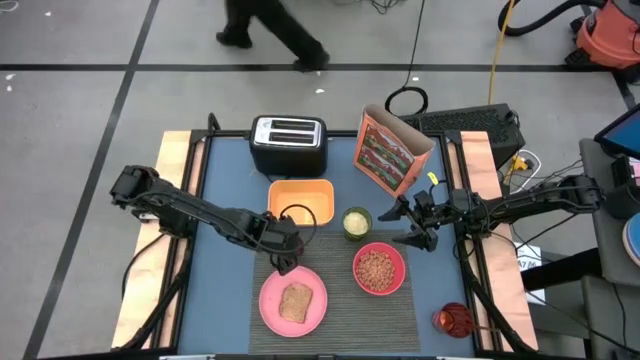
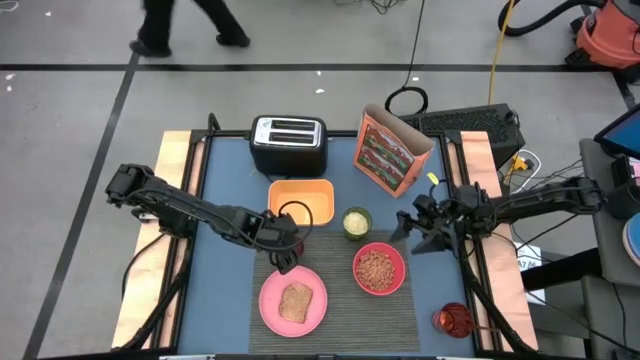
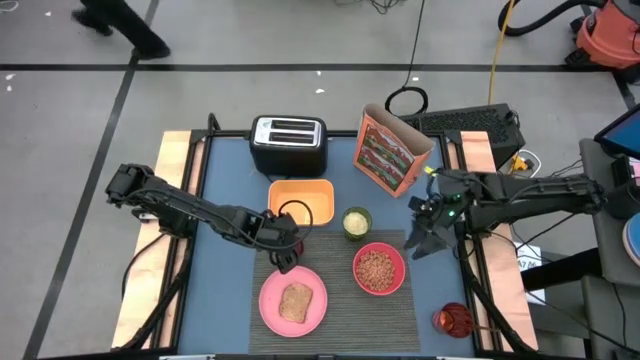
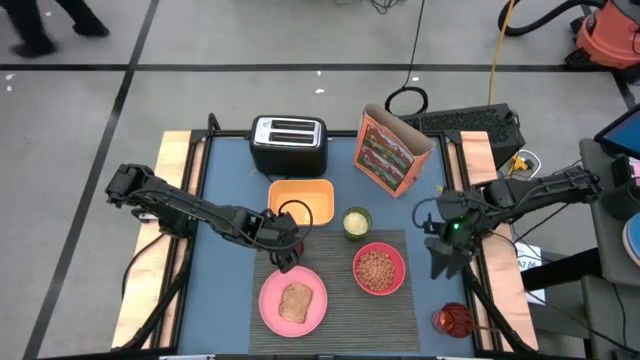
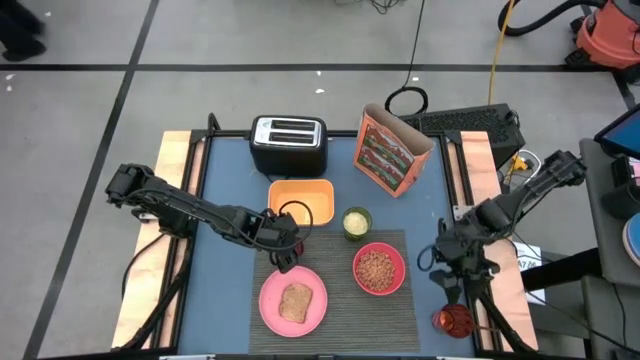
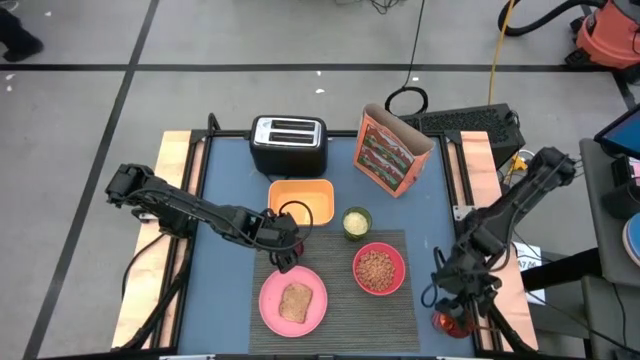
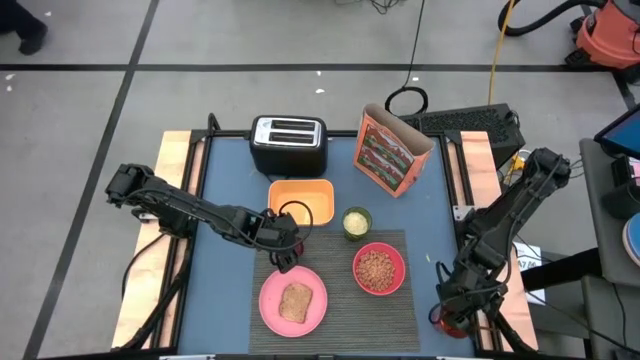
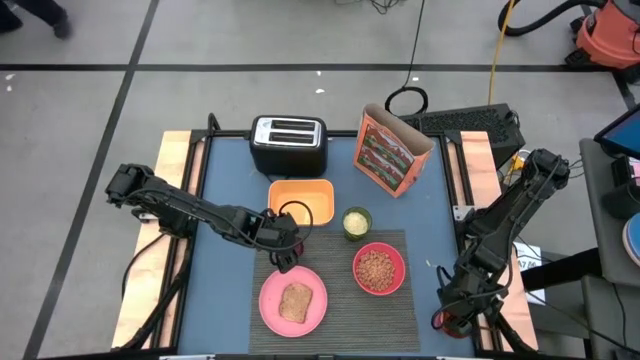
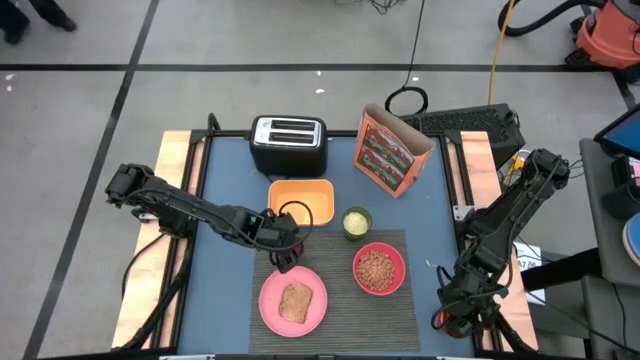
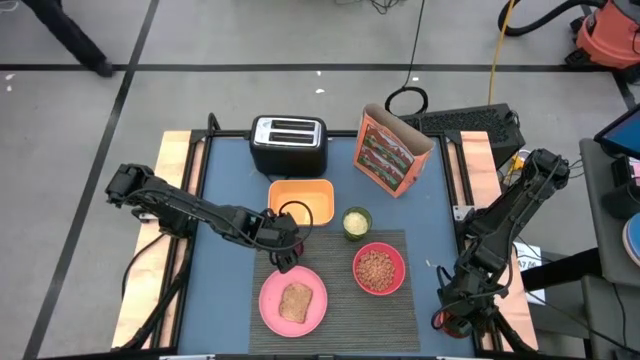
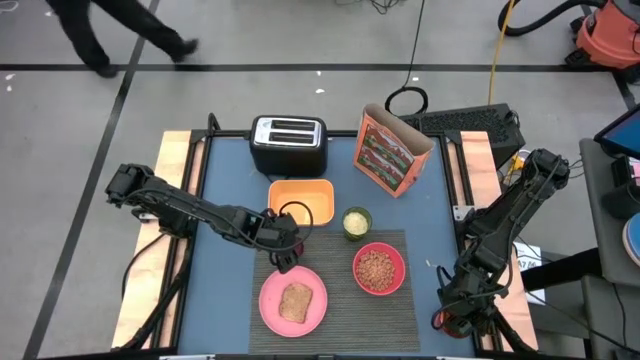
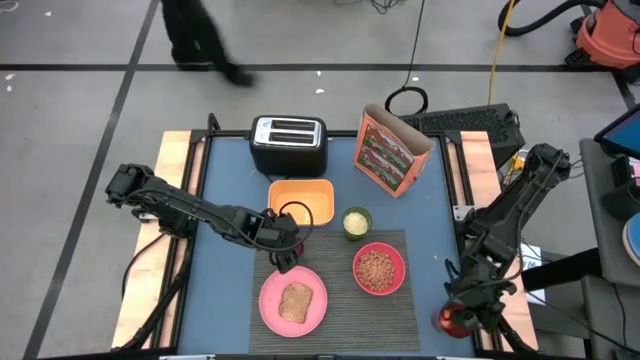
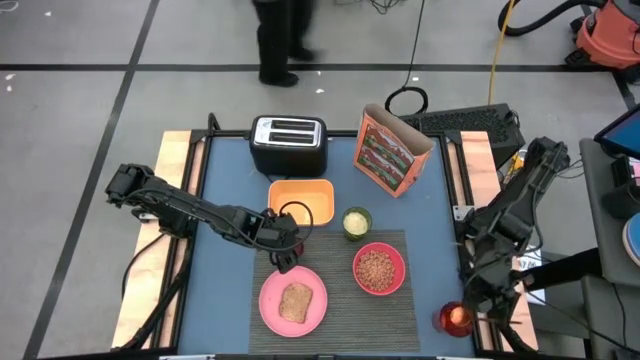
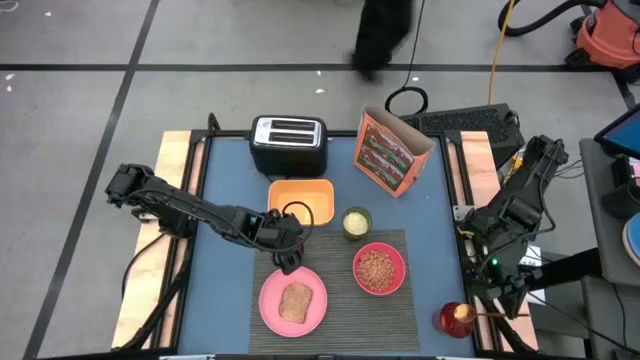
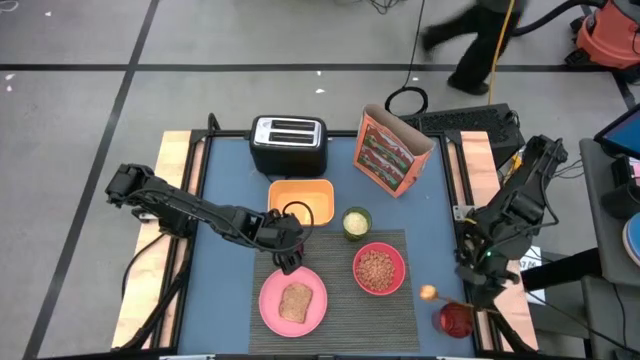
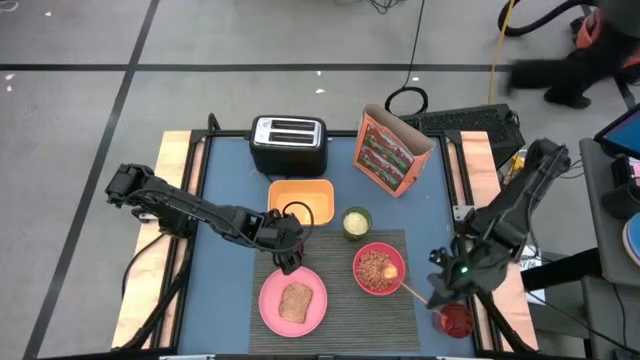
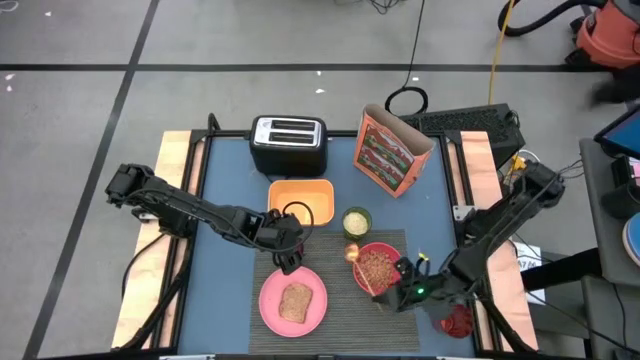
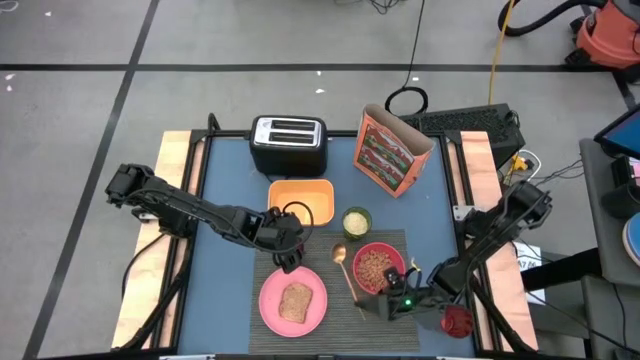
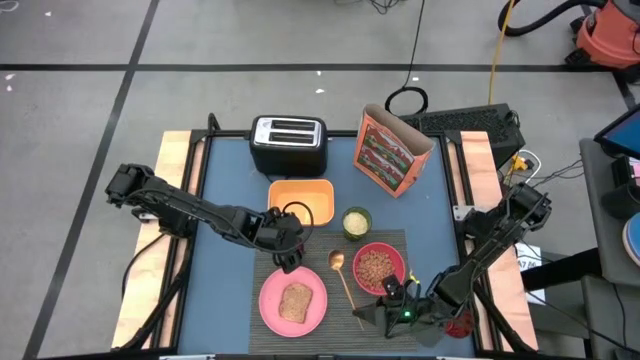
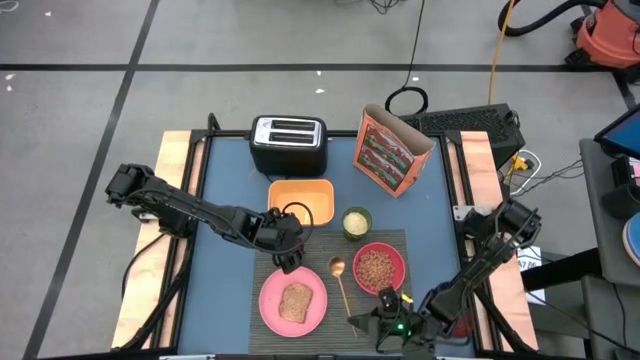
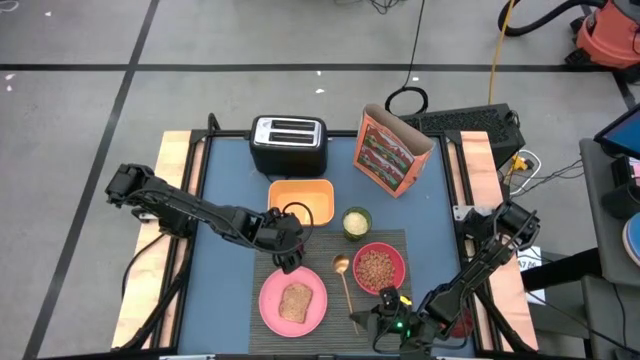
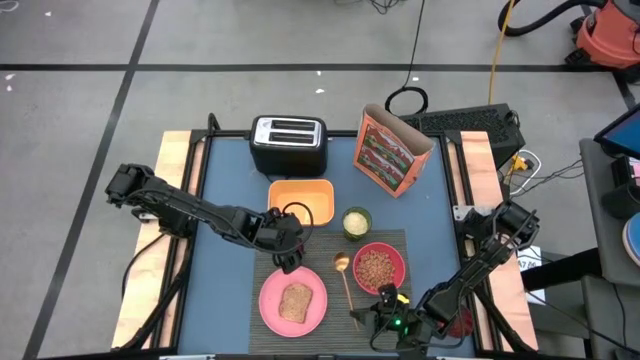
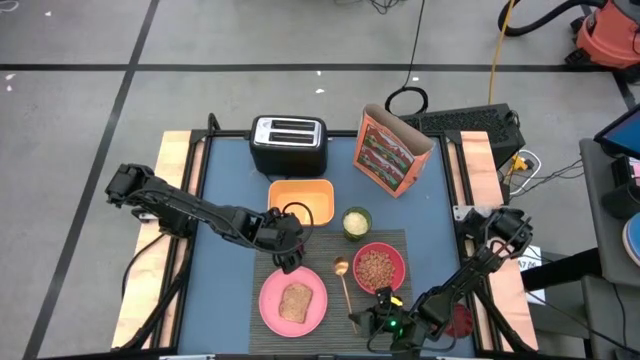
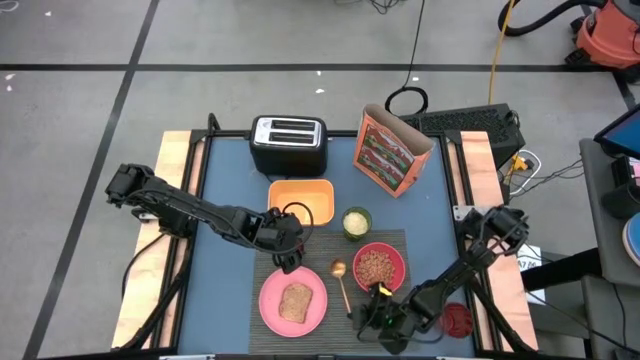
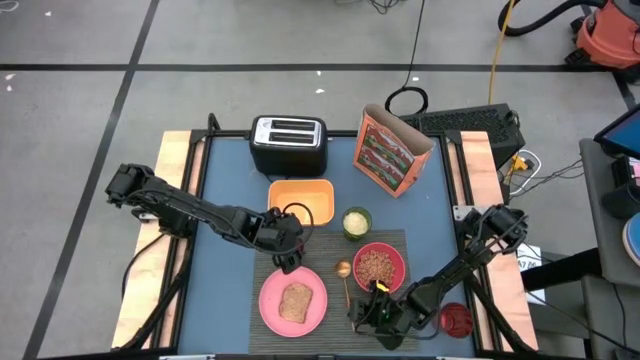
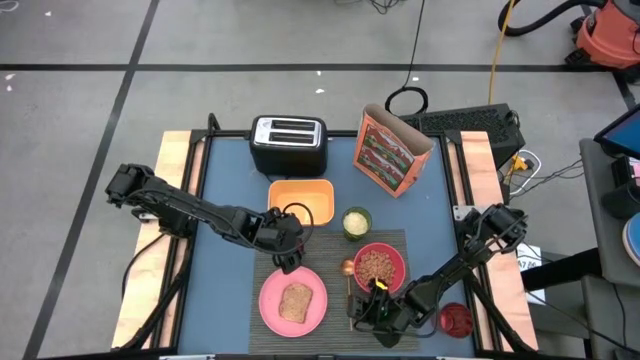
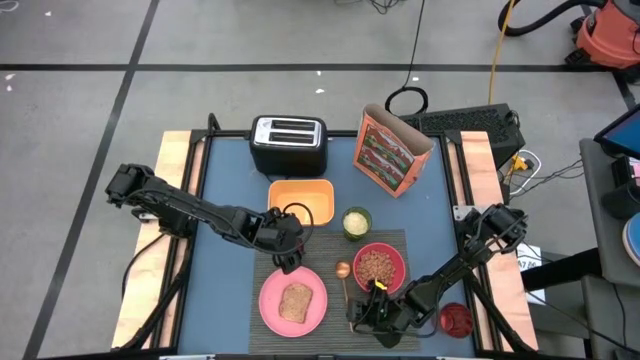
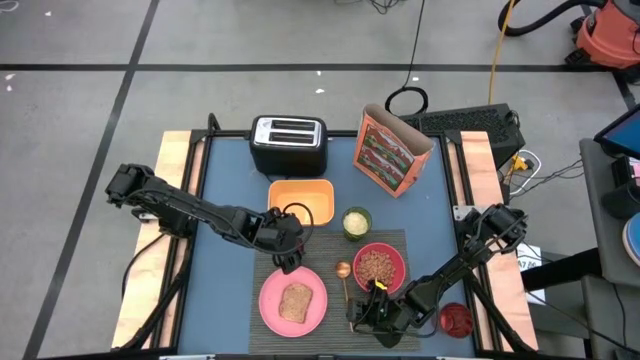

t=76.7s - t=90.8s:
Task: Arrange a breakfast setting
Put the gold spoon on the gray table mat to the right of the pink plate

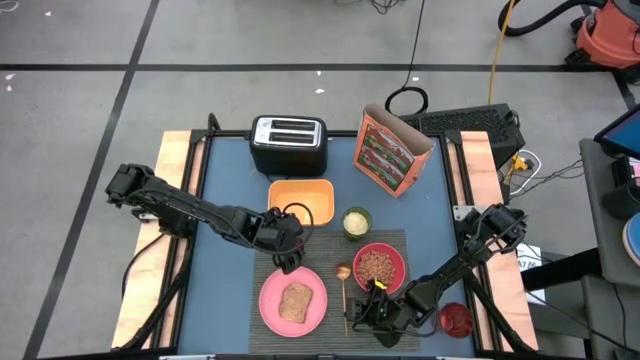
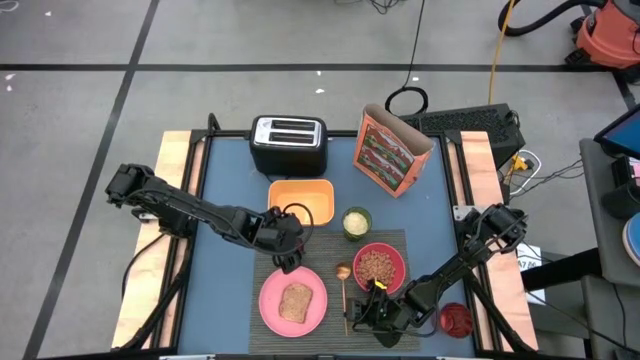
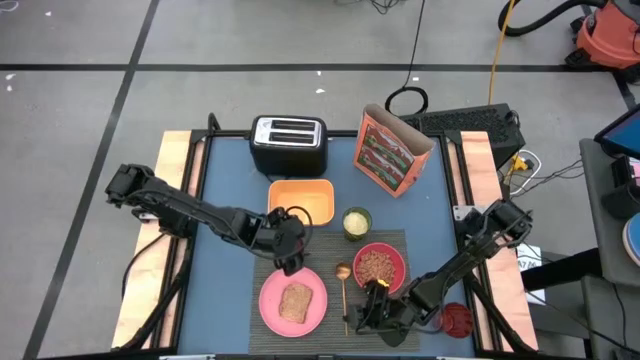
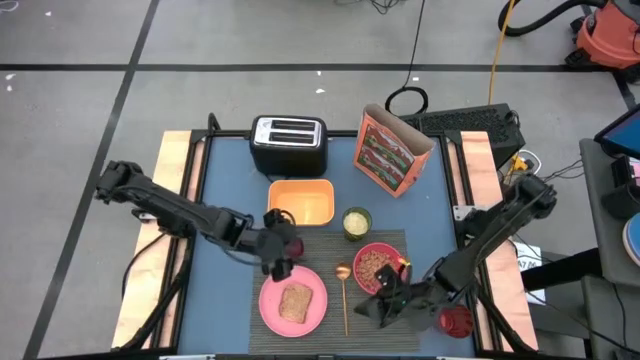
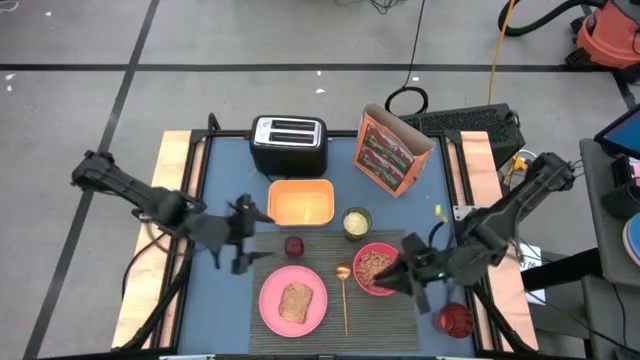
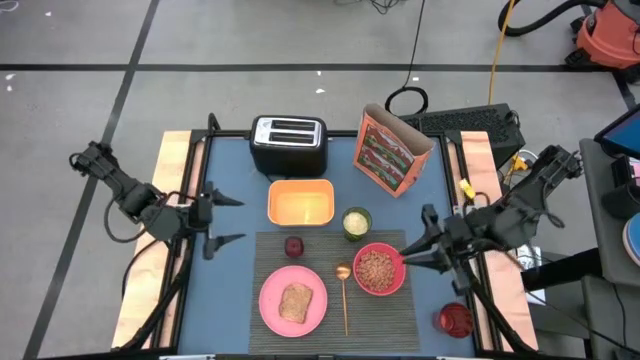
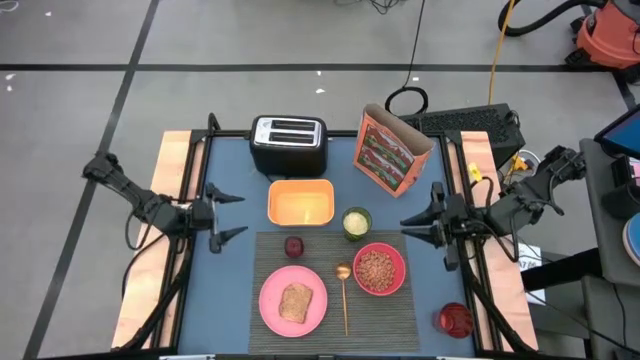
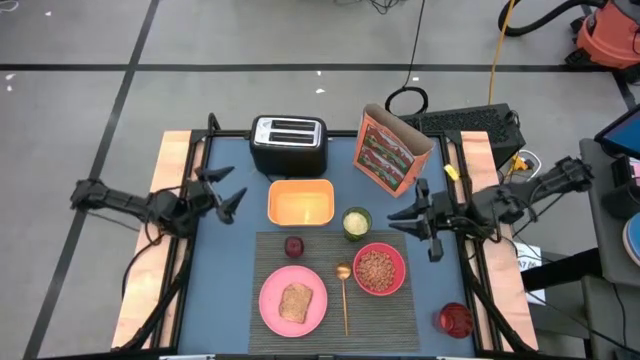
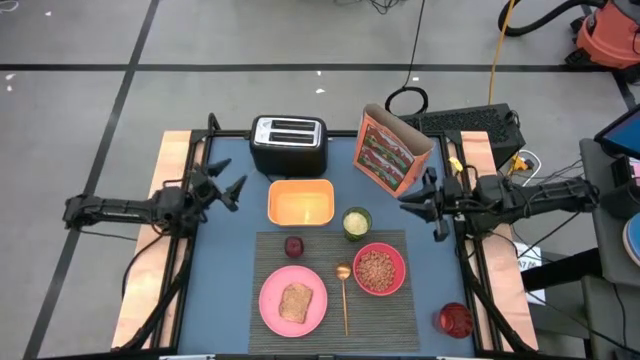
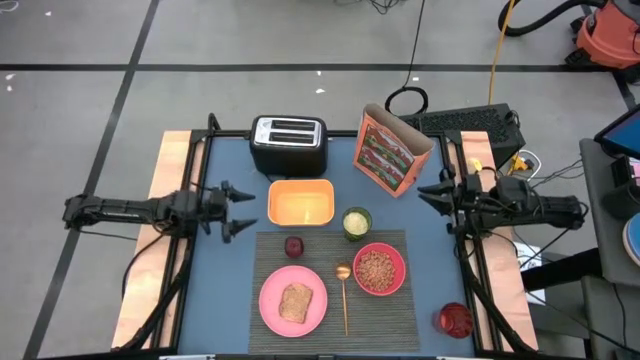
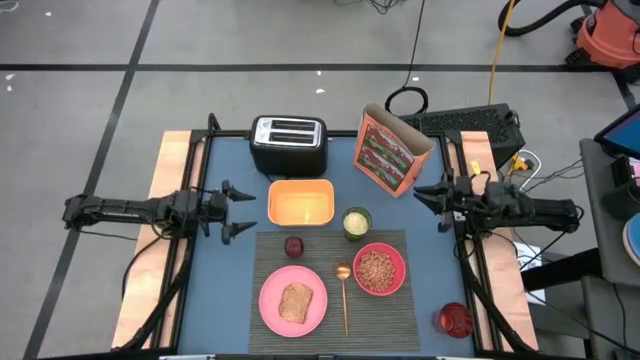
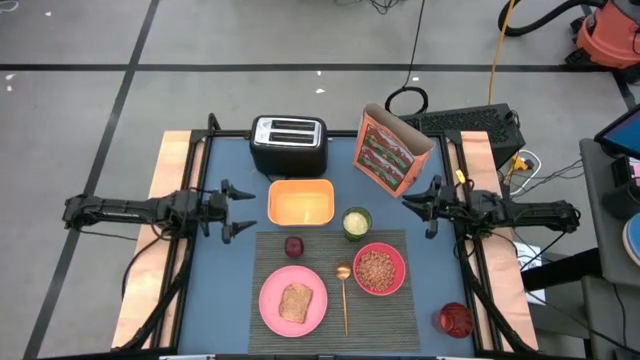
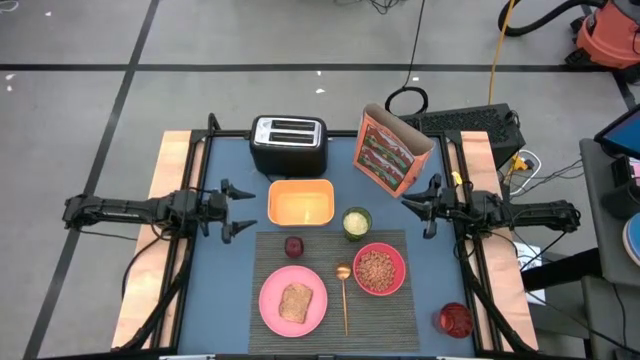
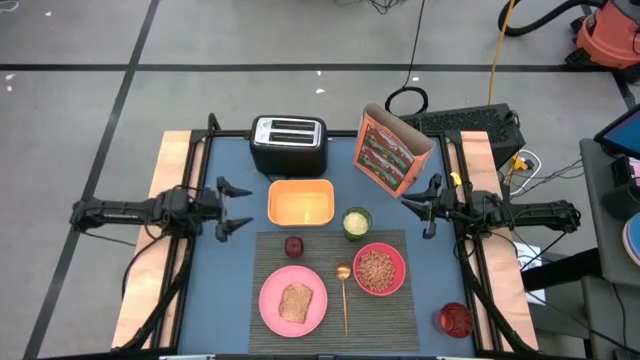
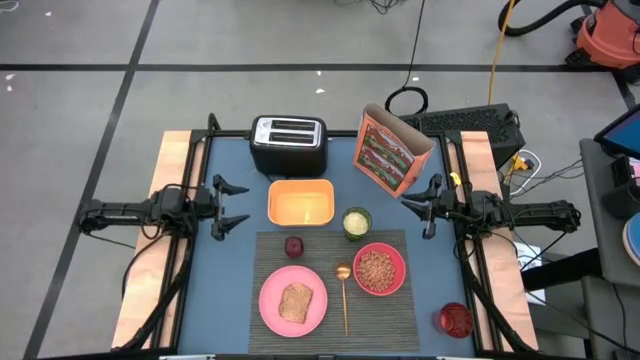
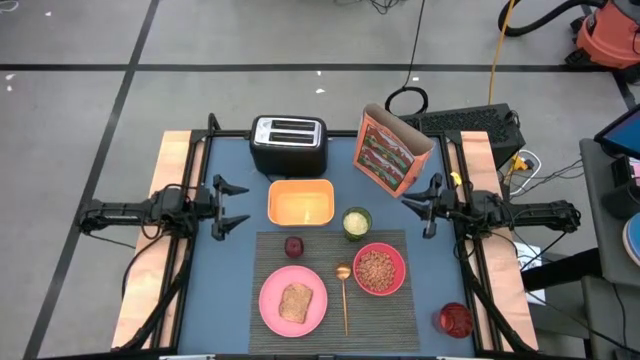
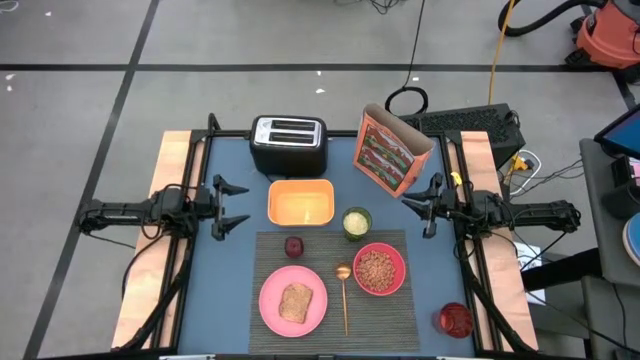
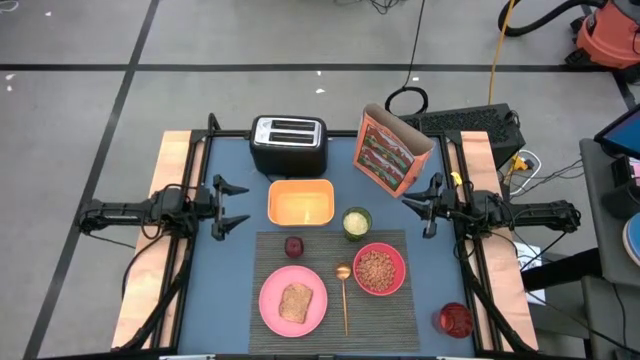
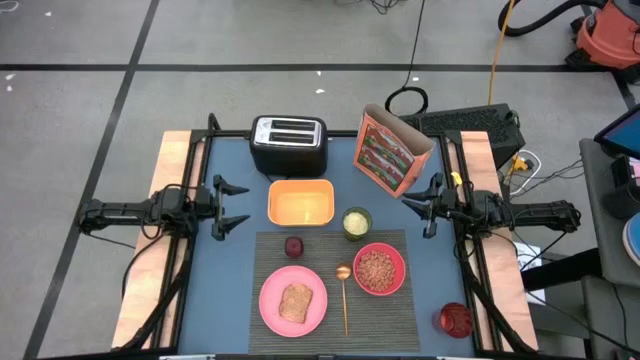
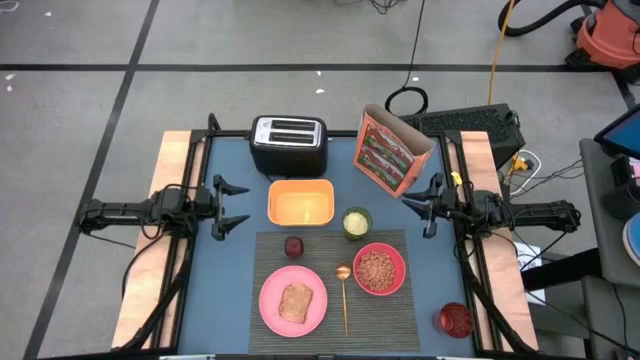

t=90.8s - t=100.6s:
Return to Home Position
